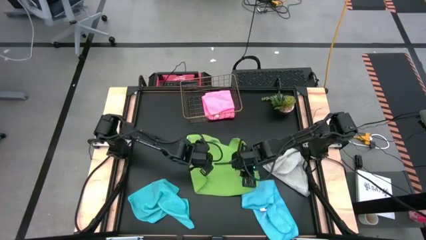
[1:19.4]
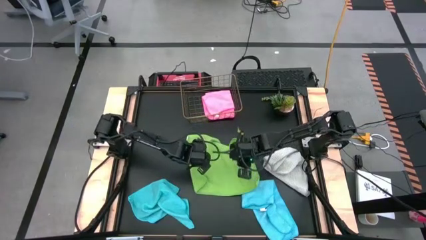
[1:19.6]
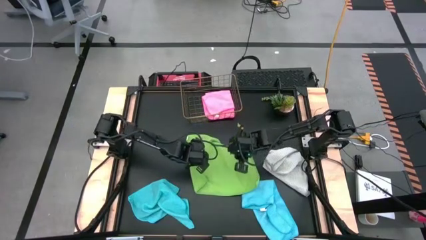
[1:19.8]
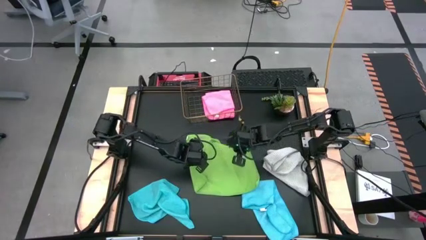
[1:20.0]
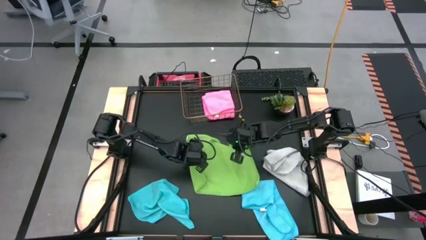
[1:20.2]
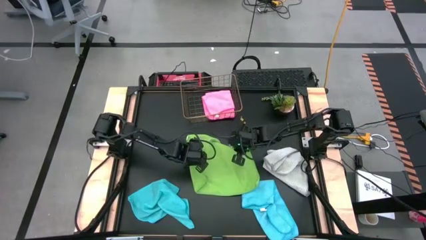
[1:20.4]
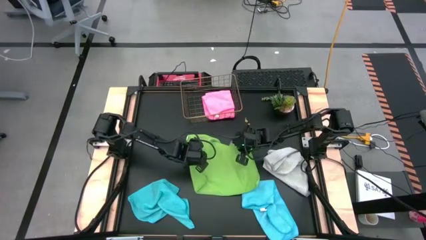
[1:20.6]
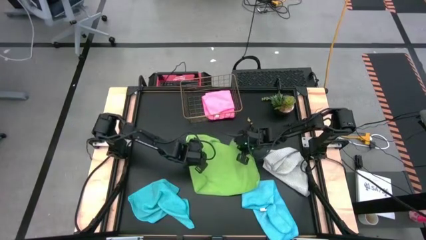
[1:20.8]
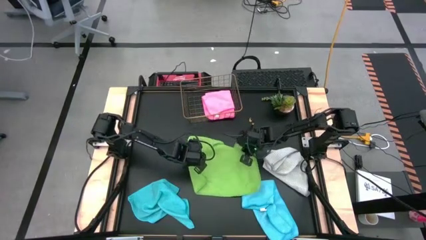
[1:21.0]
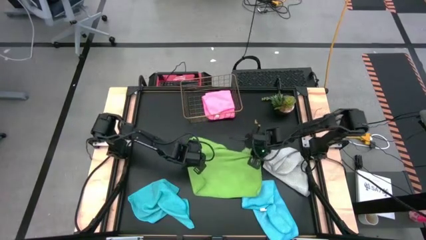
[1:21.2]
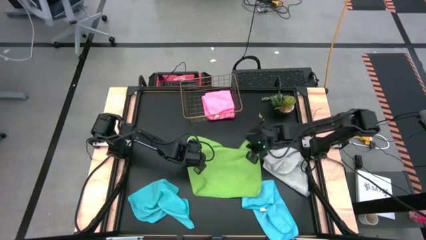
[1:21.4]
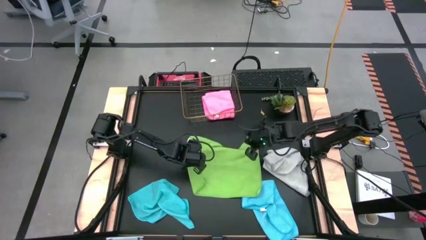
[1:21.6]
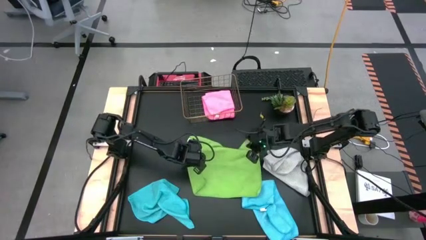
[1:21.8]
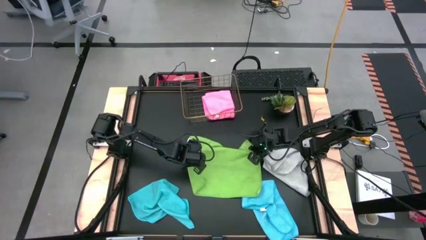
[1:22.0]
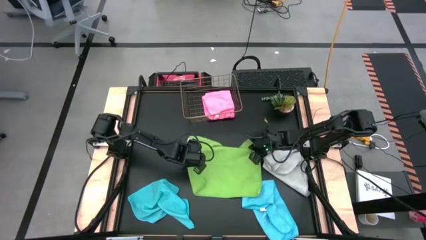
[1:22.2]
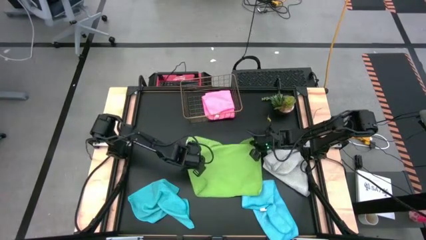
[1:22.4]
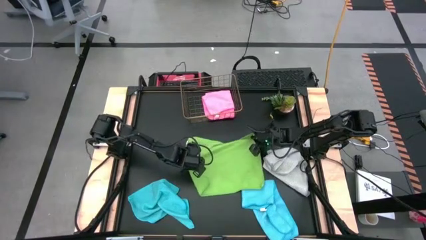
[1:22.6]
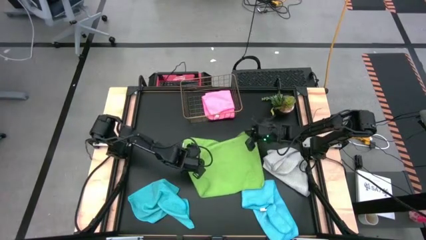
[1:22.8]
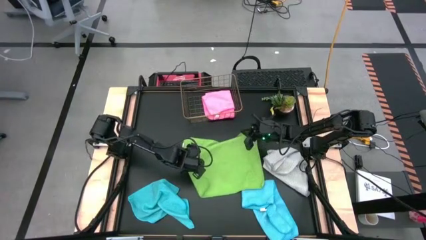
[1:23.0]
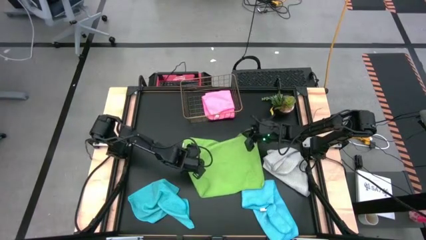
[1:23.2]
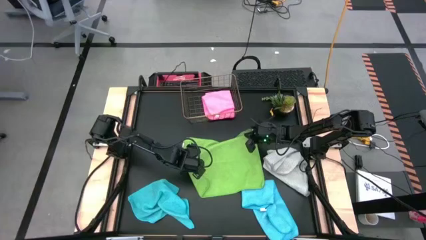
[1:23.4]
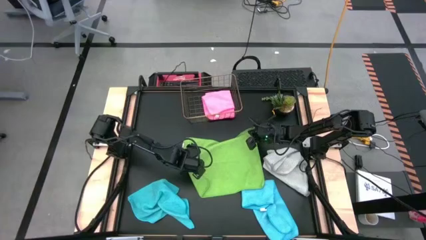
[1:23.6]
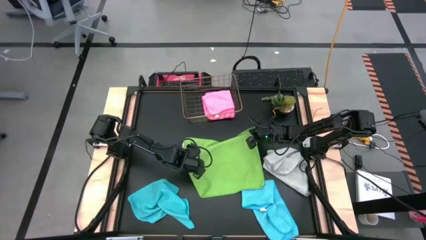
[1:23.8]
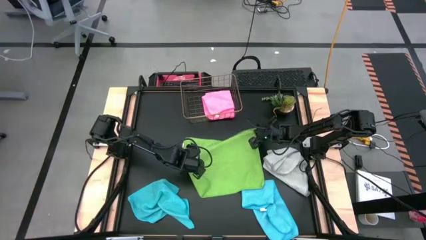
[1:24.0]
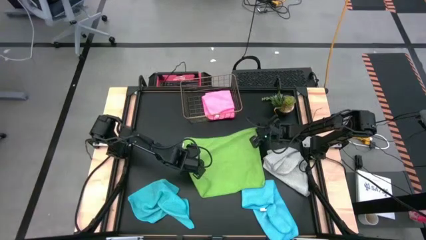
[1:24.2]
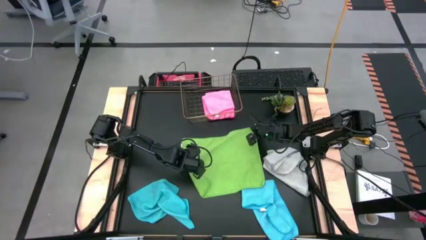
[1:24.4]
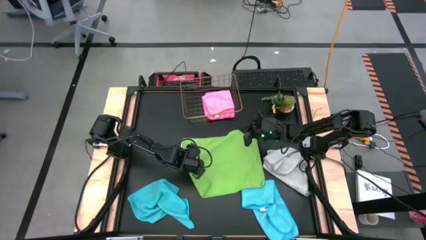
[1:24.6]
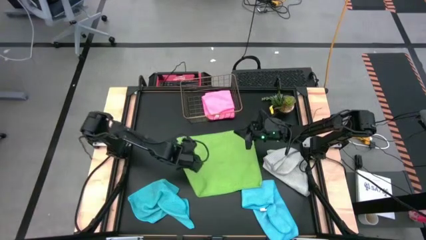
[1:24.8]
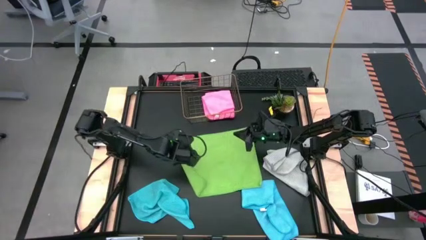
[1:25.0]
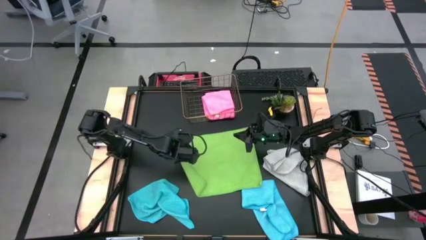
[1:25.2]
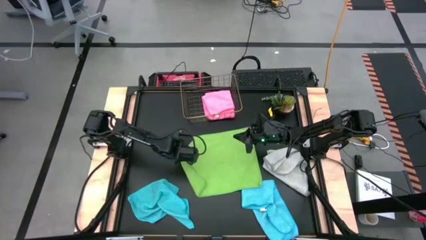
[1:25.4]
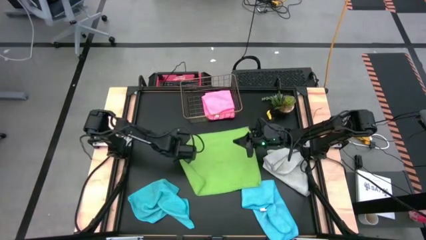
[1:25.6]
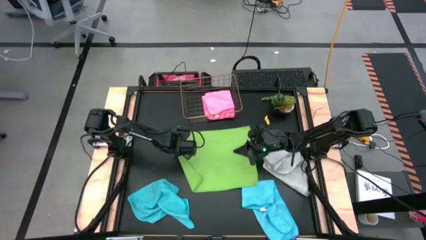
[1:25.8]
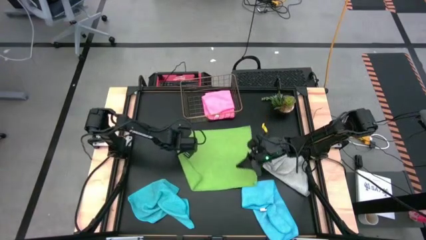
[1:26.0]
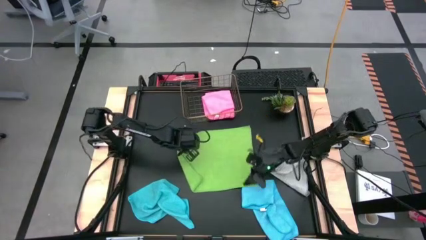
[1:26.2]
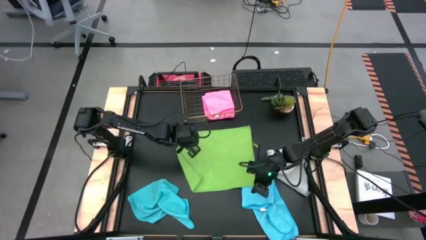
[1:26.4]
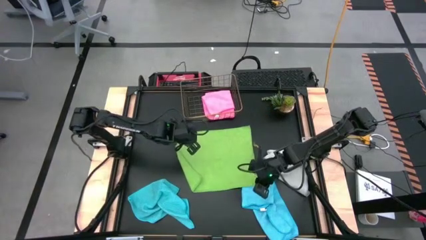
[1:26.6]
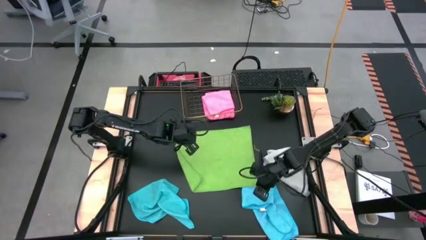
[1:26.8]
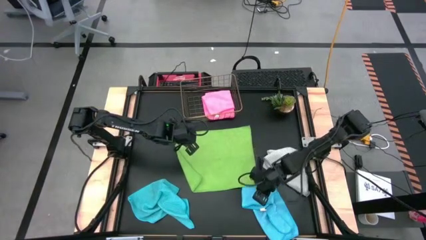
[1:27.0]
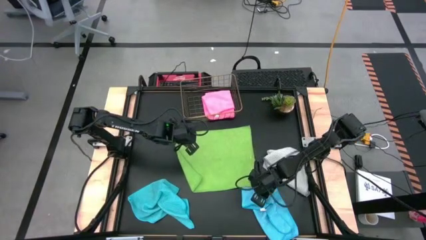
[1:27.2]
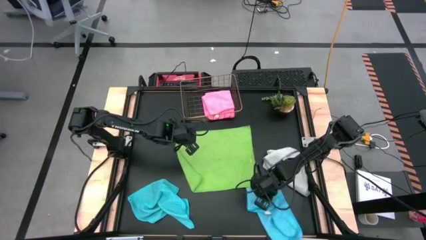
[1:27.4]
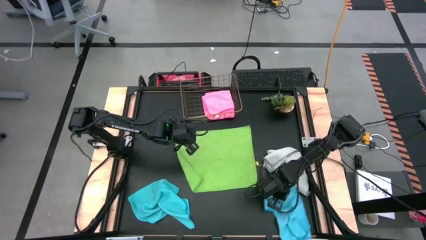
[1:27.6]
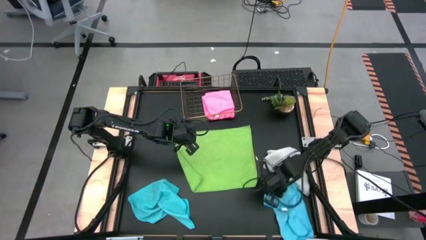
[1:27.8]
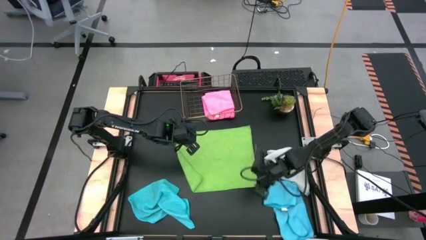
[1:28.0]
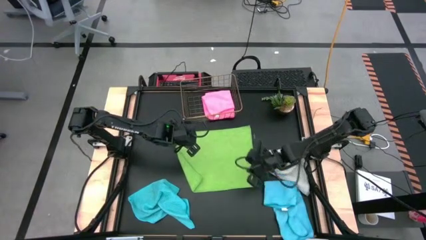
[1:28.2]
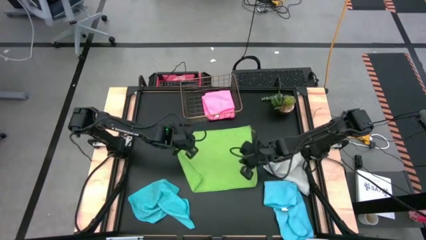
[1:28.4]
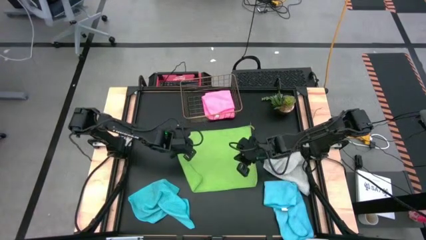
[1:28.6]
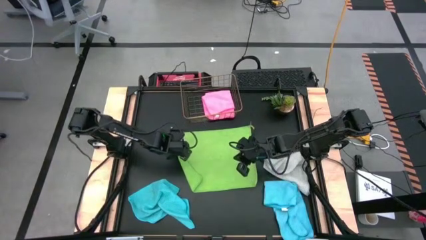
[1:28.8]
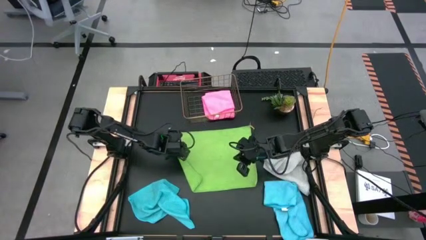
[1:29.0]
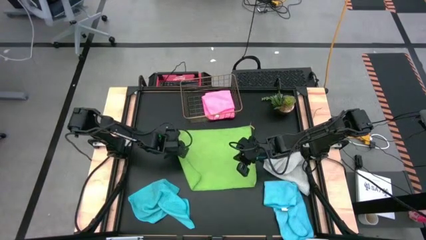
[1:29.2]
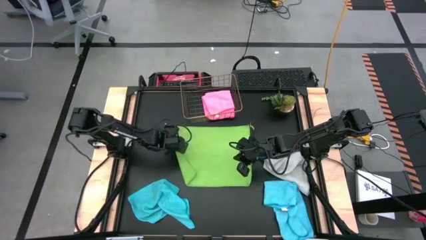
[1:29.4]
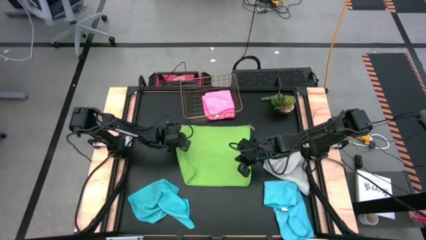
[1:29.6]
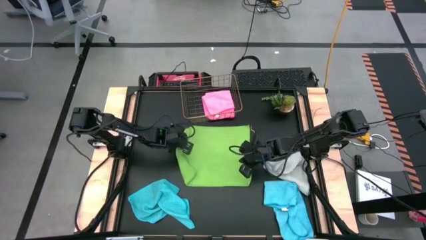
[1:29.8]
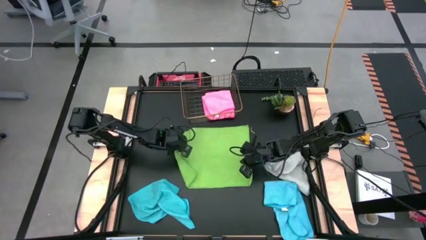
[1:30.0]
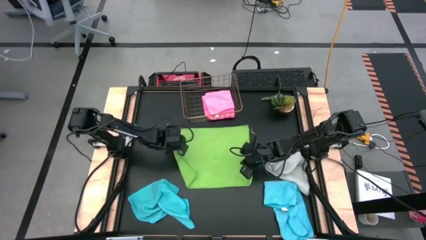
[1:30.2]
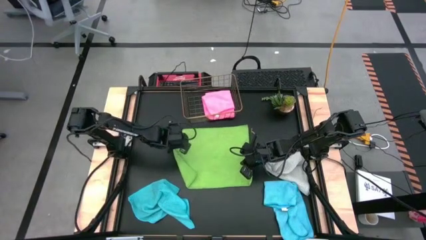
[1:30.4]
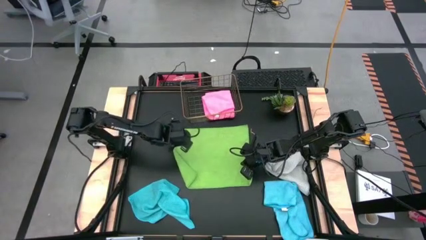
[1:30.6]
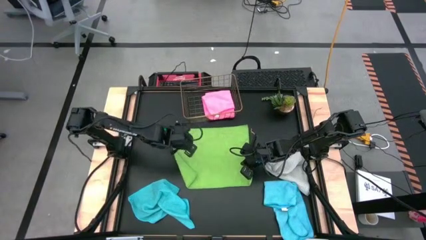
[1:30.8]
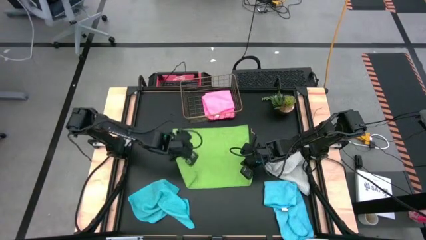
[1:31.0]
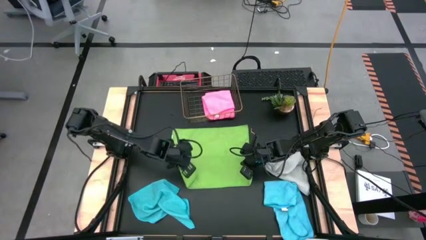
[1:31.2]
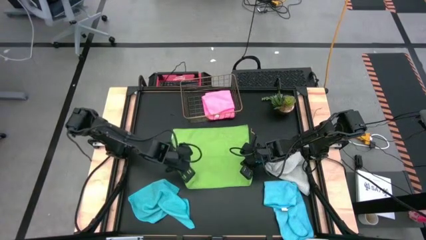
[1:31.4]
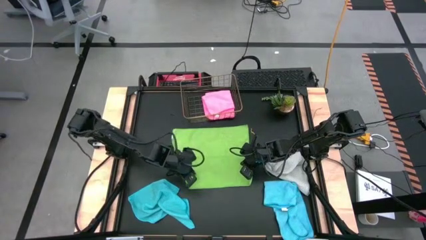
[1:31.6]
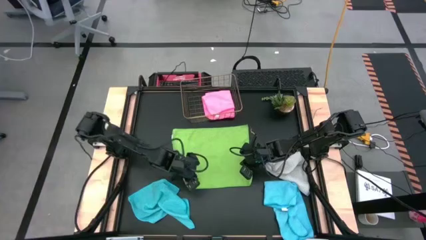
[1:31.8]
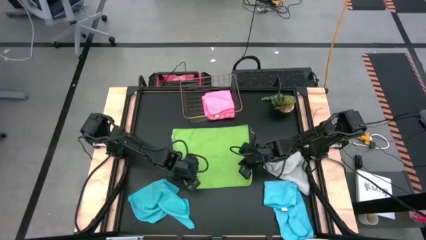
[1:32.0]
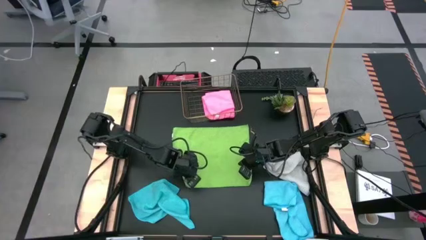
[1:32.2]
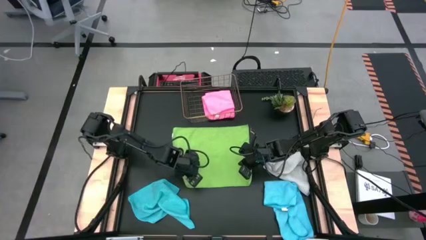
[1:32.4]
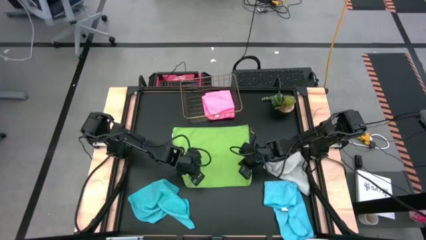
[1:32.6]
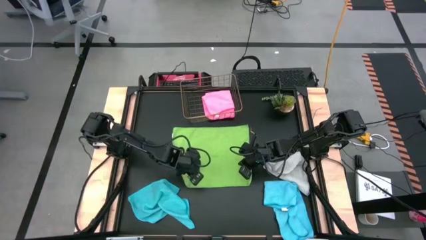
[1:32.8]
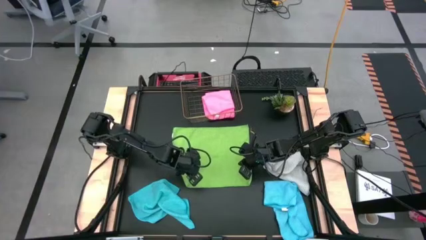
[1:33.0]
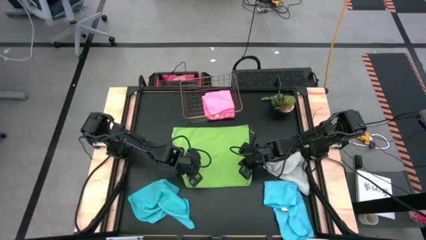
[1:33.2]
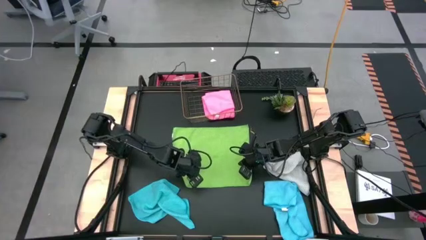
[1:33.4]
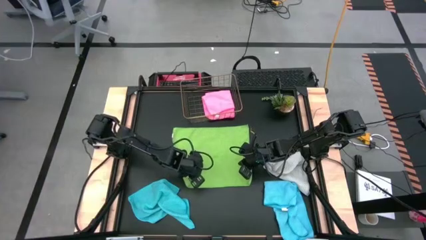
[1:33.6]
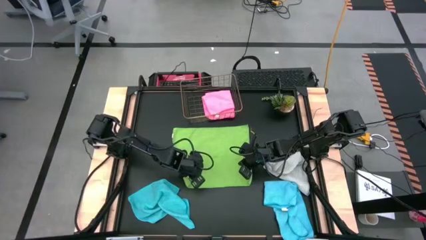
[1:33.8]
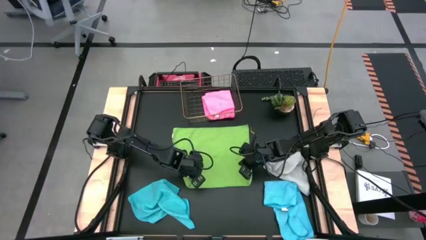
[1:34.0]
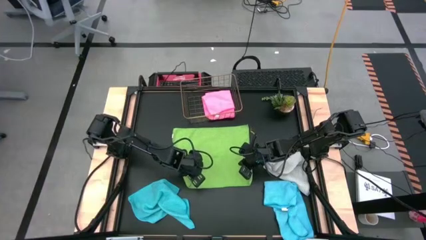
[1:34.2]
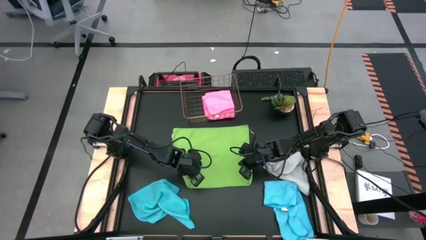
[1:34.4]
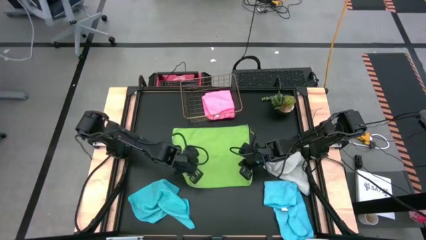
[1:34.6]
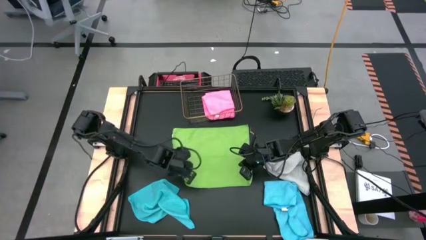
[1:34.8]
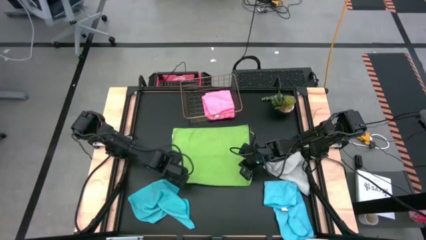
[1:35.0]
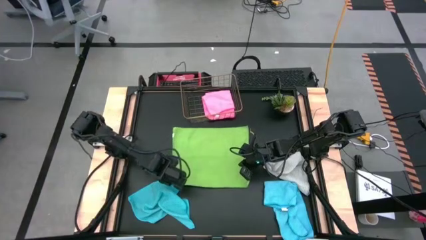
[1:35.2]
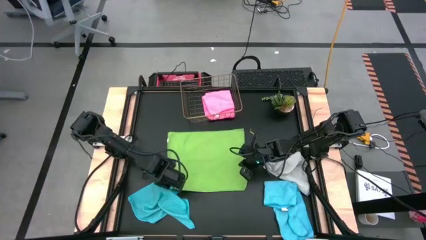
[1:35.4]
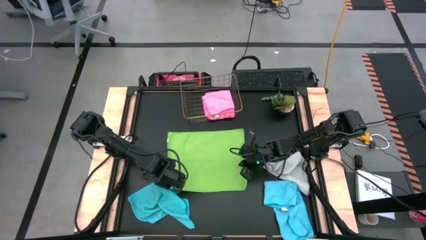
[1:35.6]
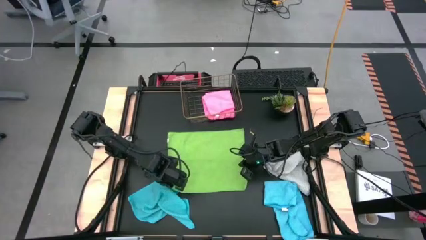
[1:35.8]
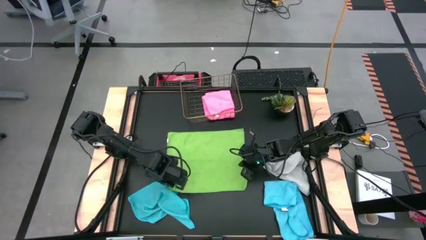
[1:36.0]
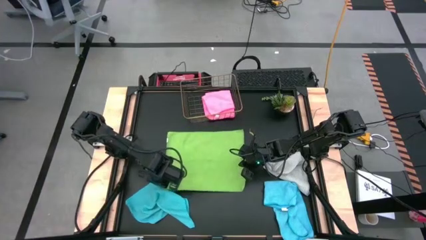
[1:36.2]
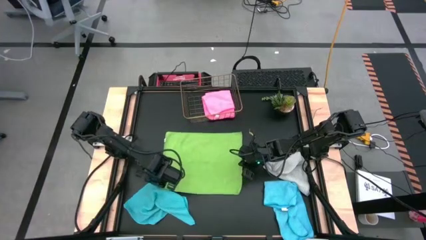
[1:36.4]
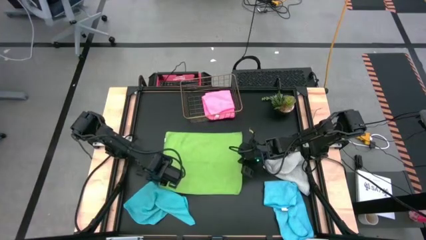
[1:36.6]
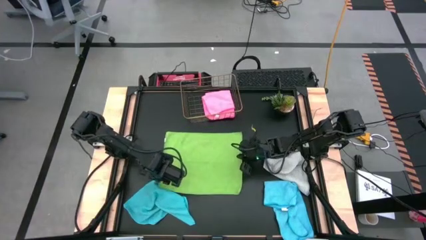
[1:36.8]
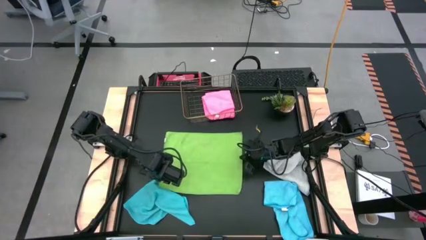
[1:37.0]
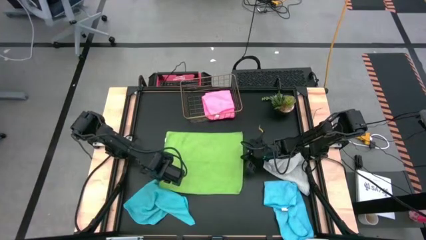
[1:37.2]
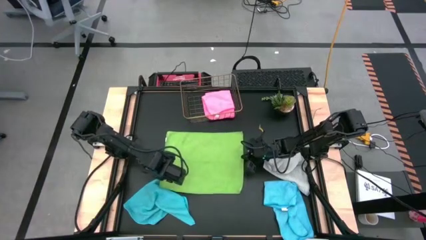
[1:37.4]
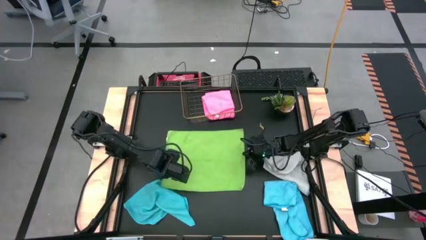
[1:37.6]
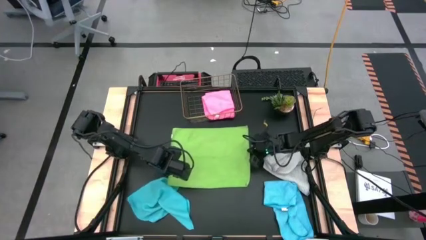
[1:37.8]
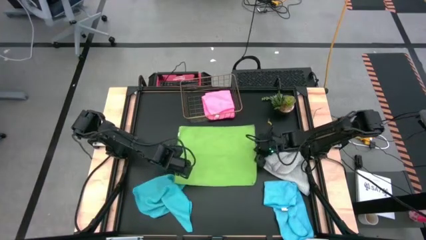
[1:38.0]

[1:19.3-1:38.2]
Task: Fold microfiber towels
Fold the green microfiber cloth in quarters
